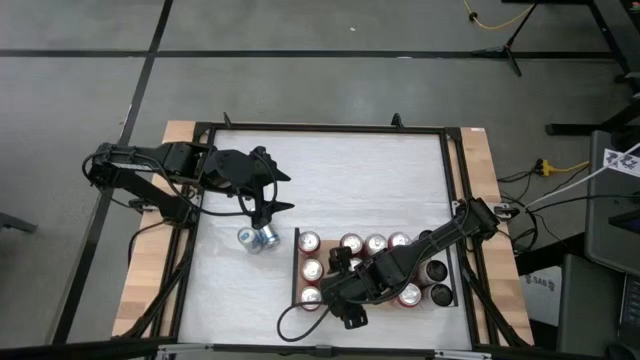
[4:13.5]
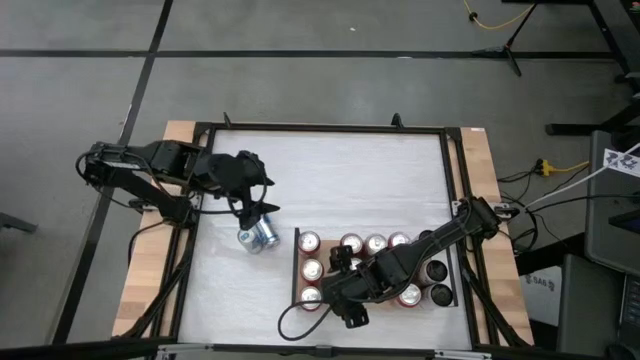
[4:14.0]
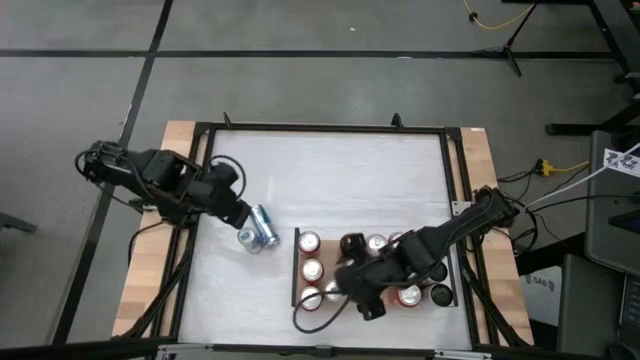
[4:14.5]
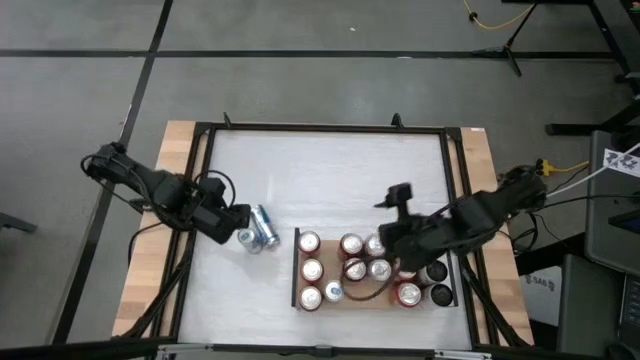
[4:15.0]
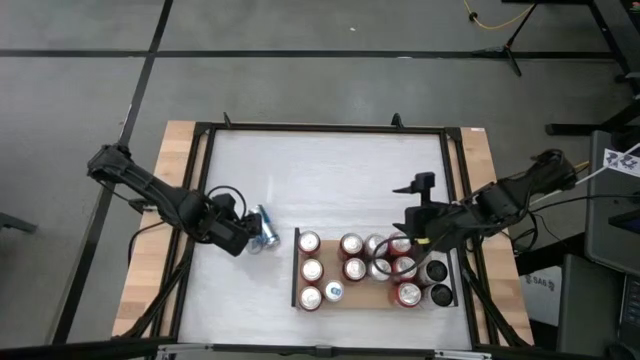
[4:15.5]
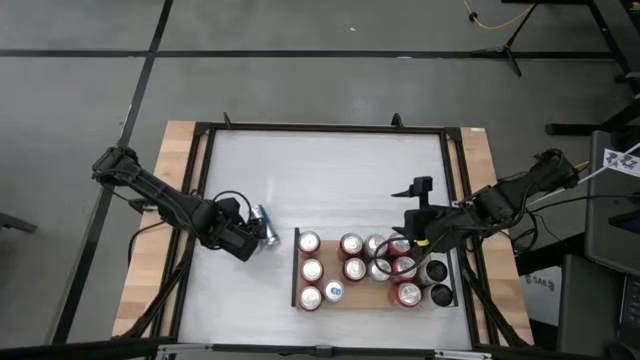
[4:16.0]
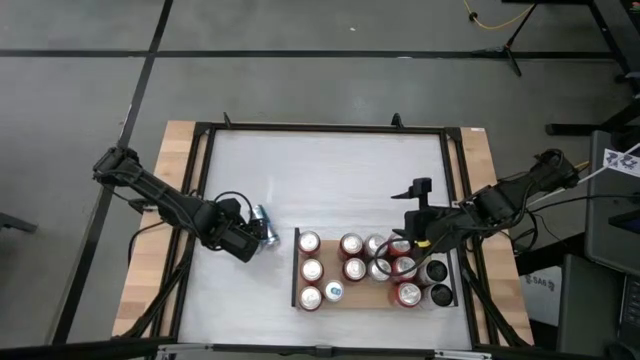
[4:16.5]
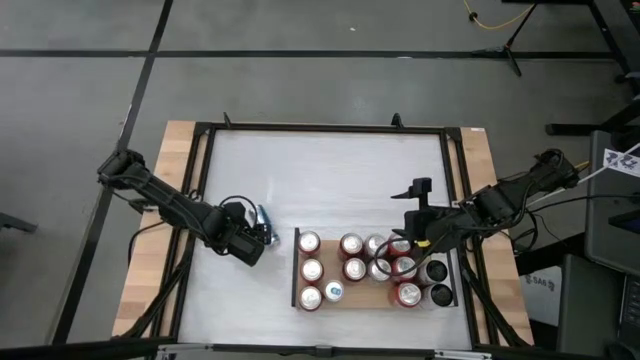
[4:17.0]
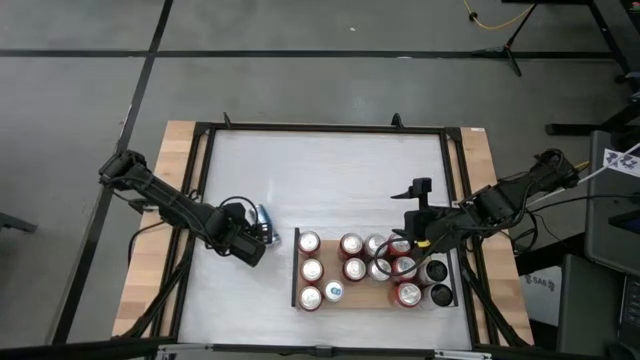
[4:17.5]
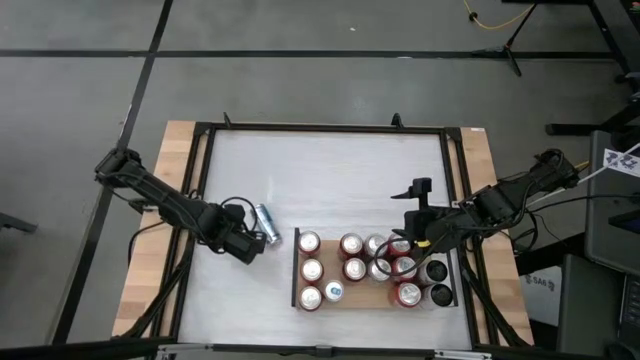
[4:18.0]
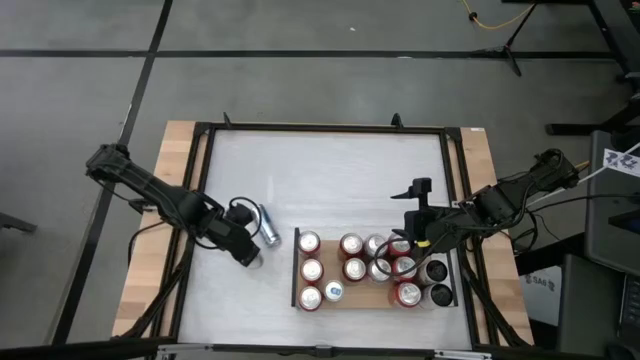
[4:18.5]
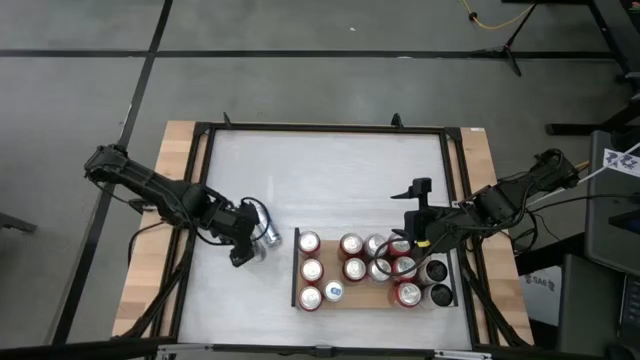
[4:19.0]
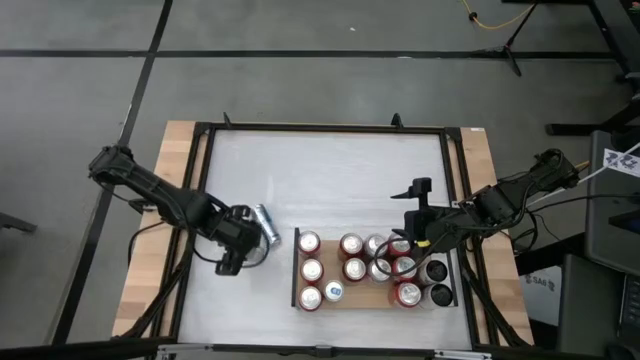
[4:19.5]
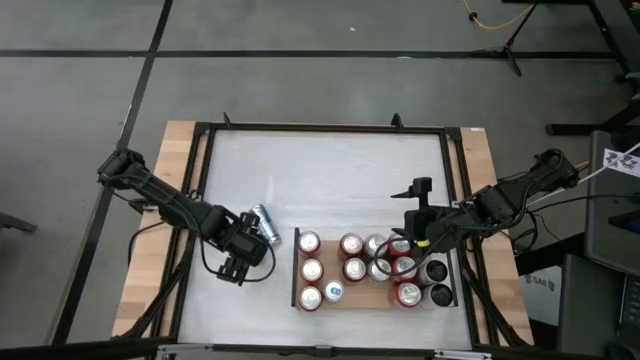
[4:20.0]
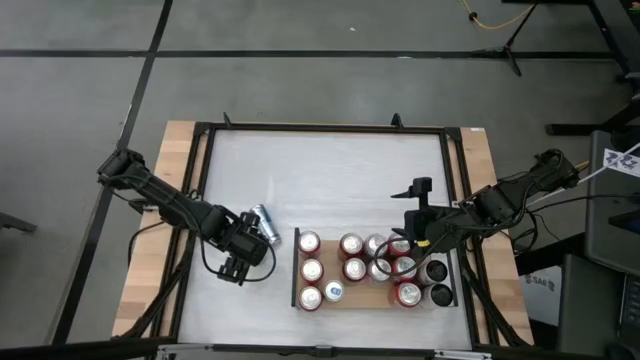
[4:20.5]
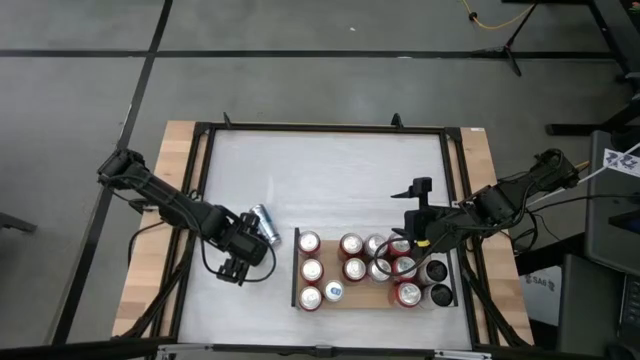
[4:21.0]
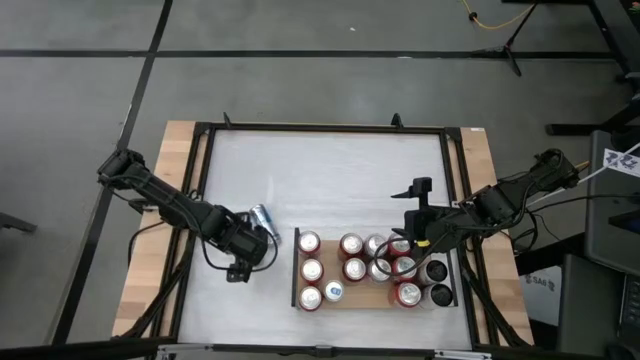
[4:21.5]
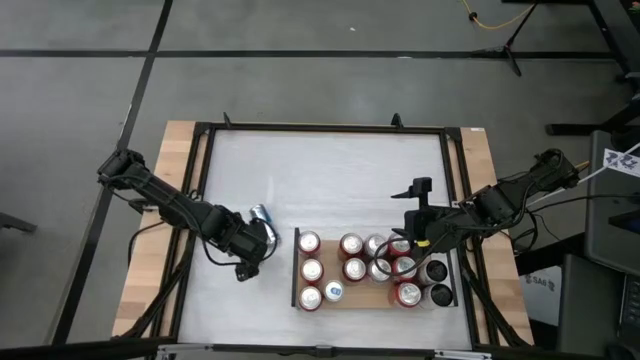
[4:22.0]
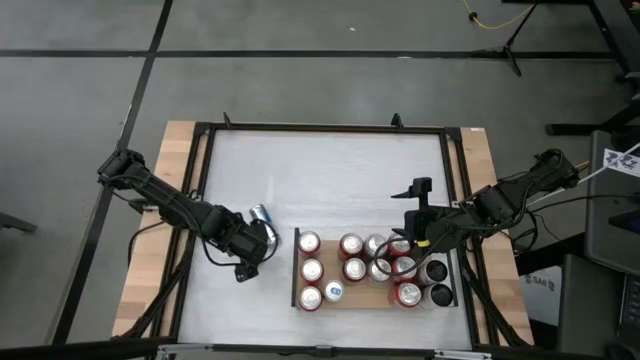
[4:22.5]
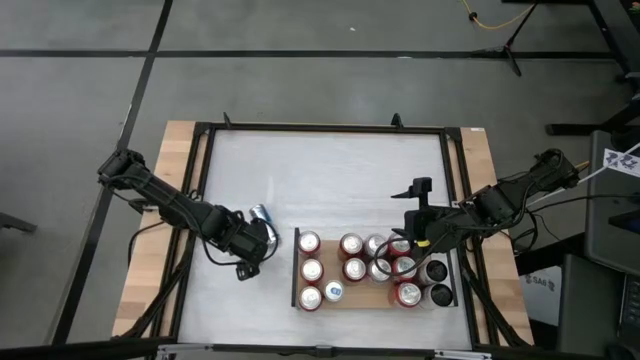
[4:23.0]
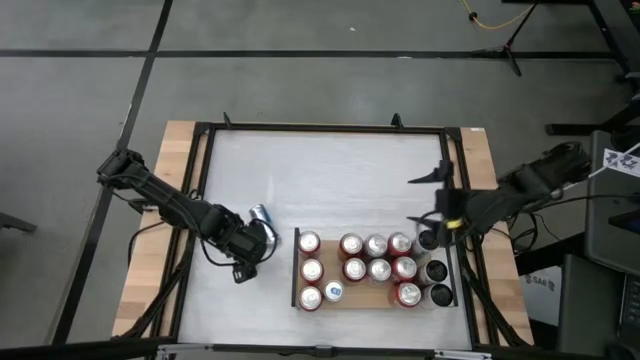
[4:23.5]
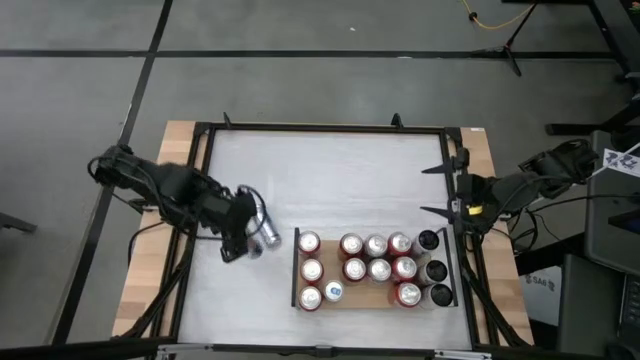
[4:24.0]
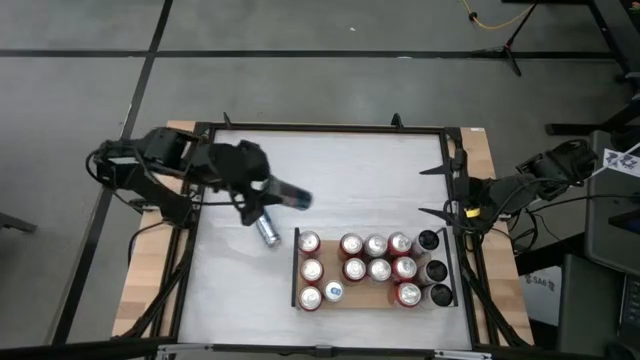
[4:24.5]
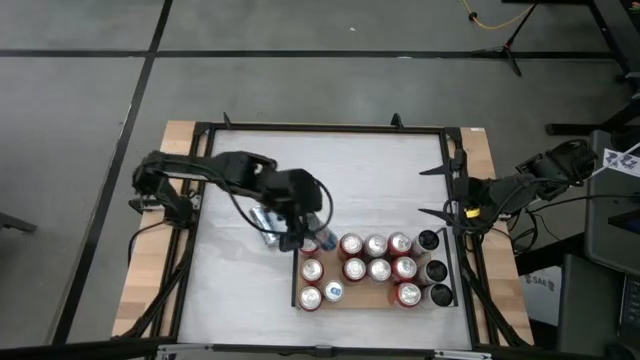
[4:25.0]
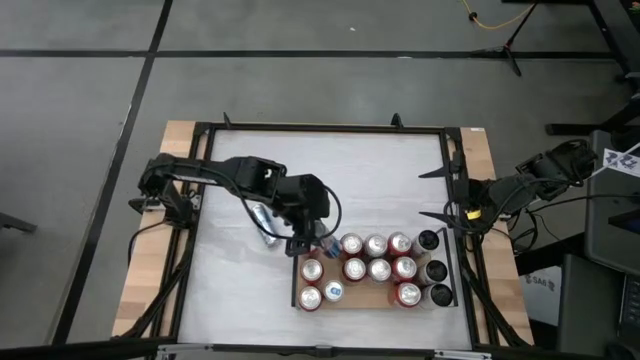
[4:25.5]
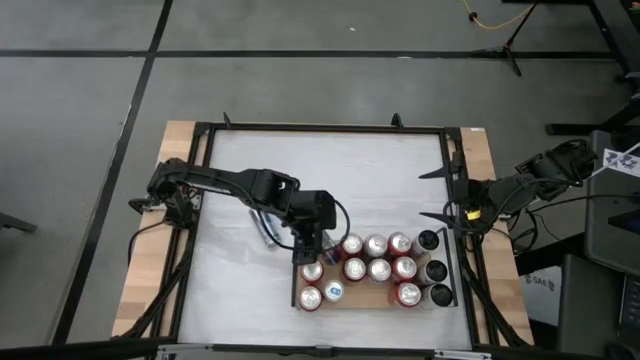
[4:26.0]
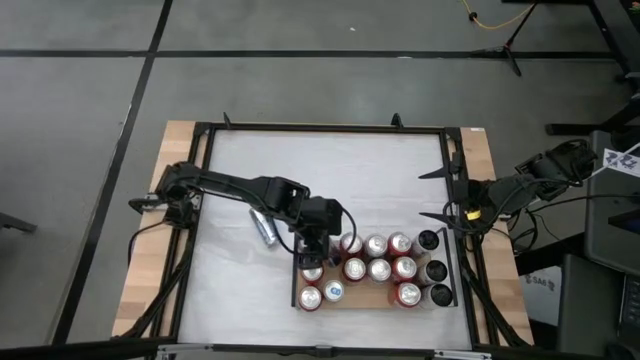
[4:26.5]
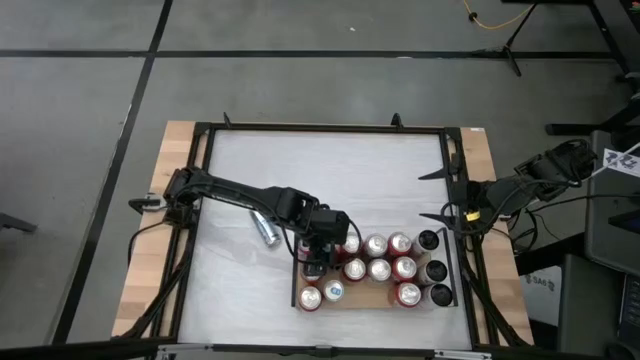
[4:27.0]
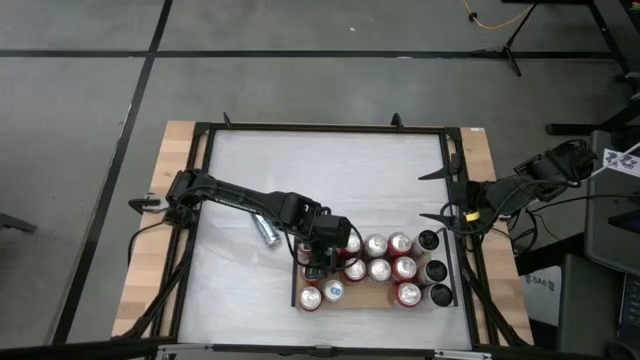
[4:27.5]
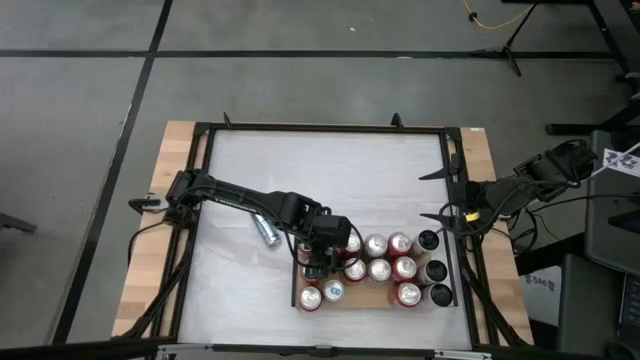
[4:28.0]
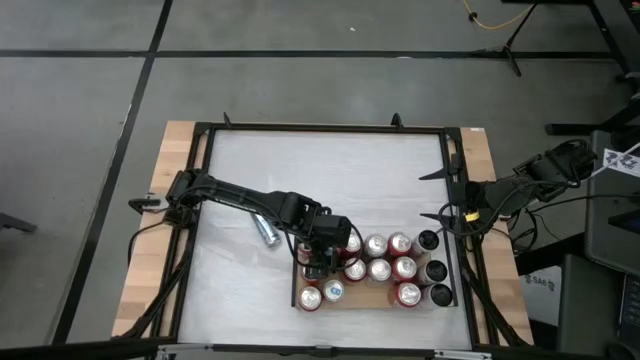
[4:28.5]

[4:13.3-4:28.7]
Task: Place canned beverage on shelf
Put the bottom left blue soda can on the shelf

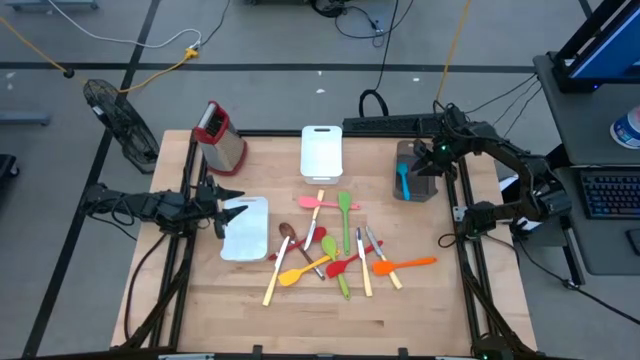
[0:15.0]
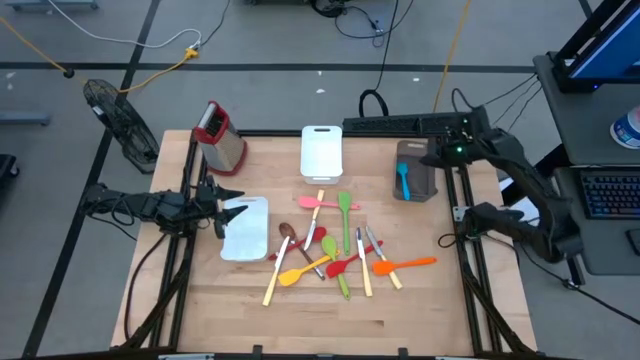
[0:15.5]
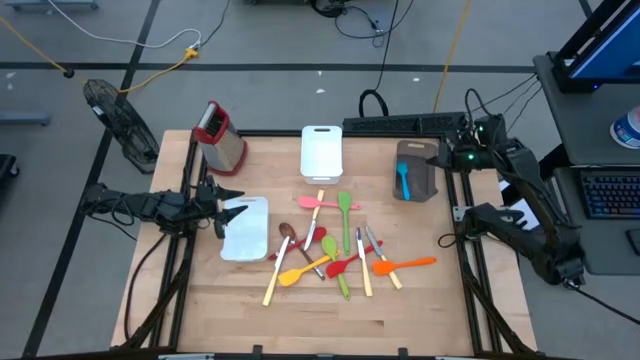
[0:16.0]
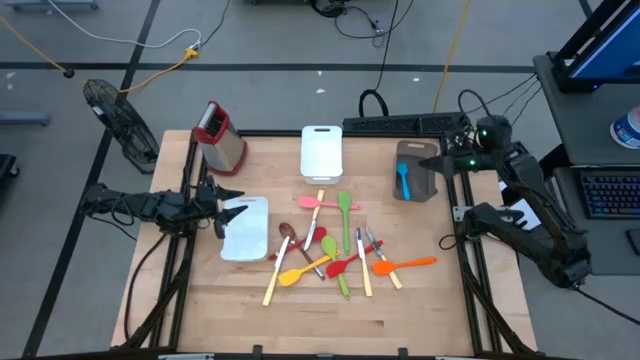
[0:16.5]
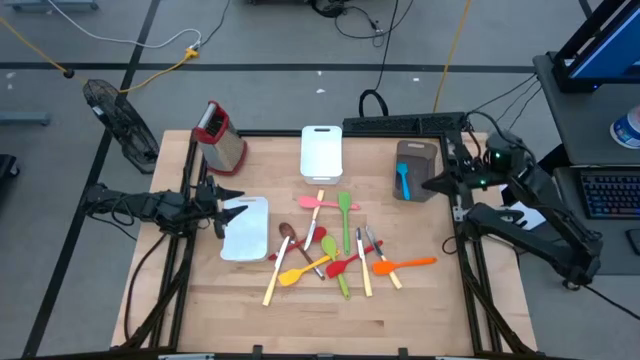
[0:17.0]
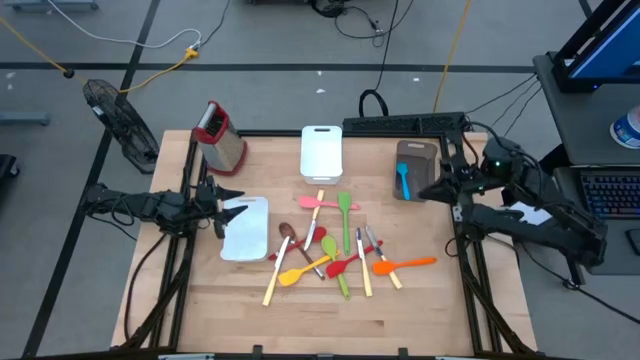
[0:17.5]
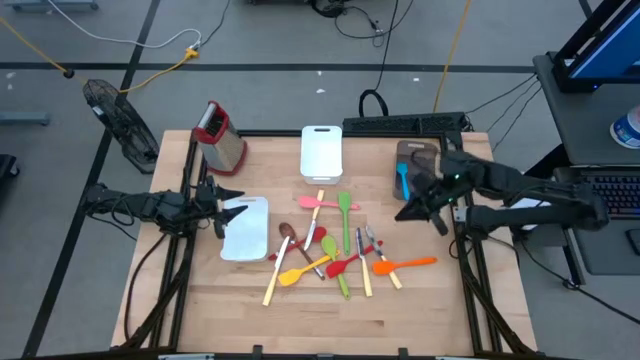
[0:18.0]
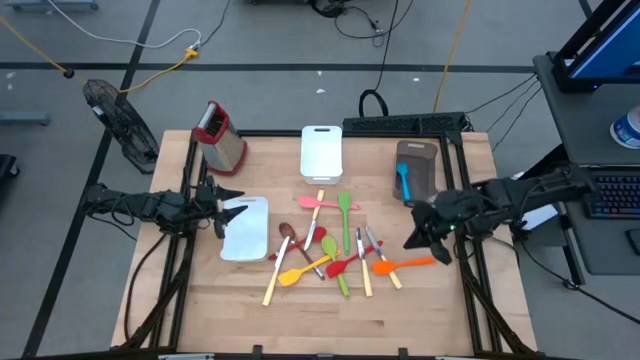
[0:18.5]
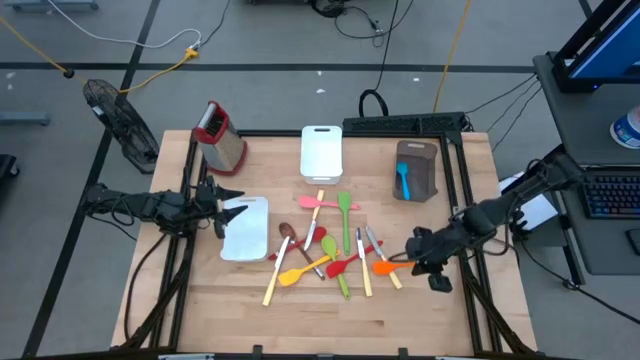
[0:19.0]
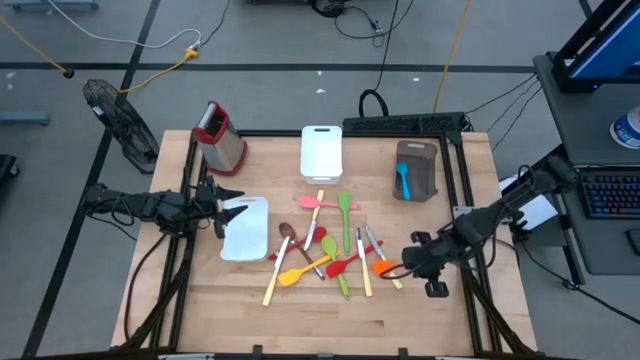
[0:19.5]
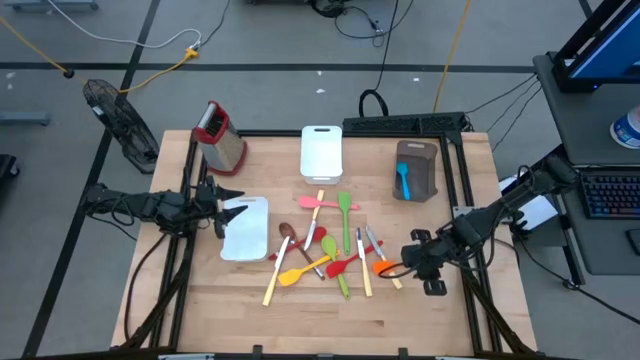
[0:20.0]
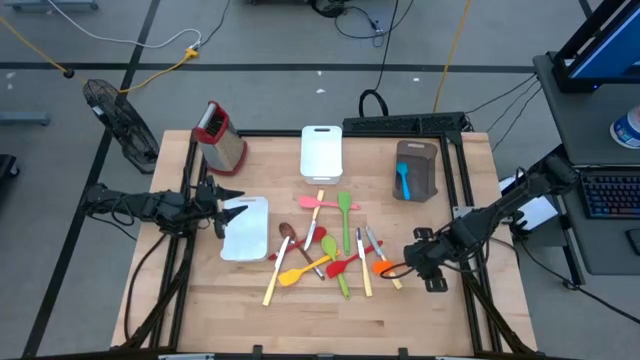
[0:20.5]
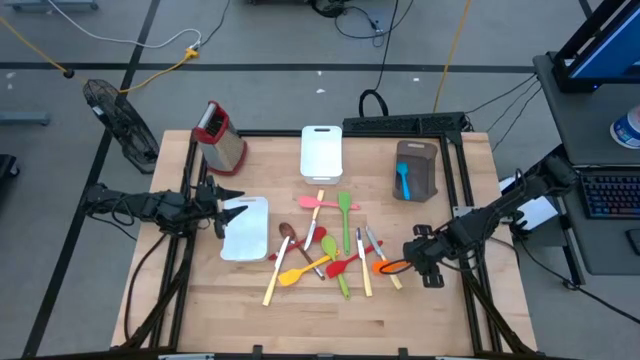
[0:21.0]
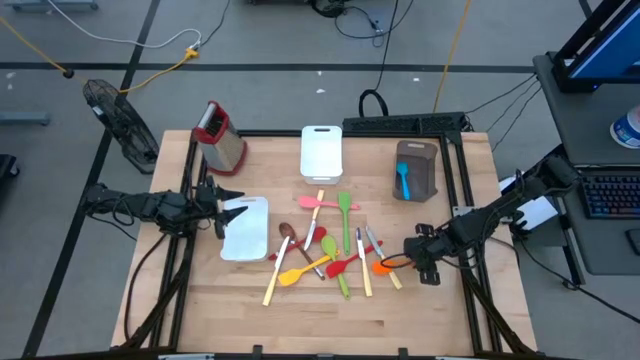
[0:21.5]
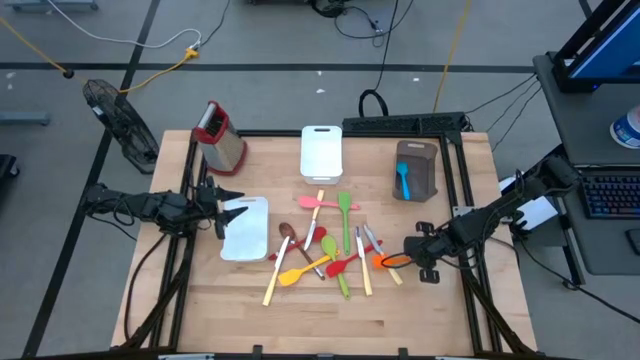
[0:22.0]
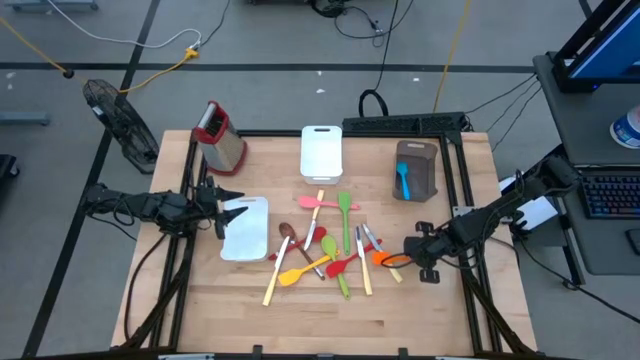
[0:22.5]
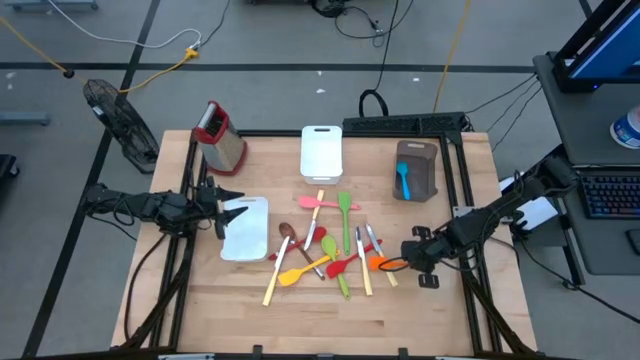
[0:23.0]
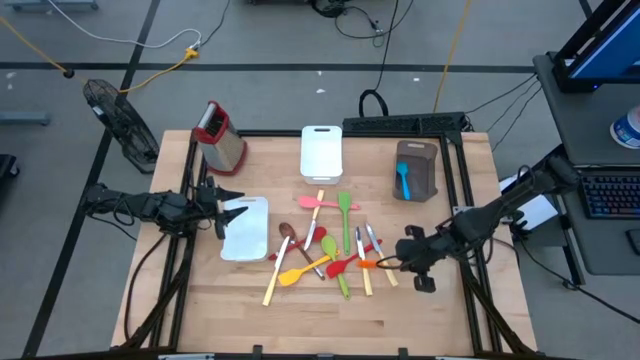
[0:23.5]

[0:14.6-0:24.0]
Task: Pick & Place Kitchen Items
Put the orange spatula into the black bin
